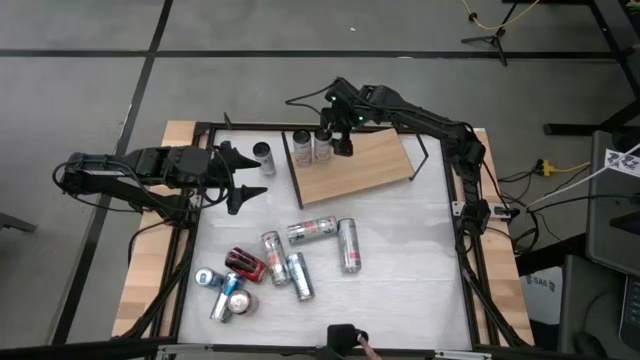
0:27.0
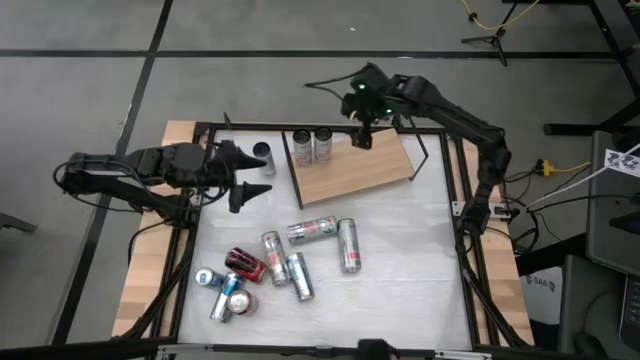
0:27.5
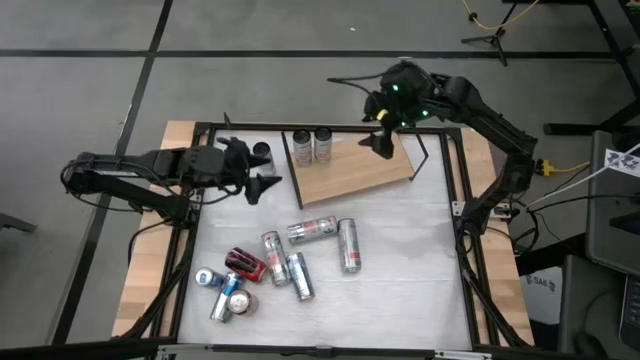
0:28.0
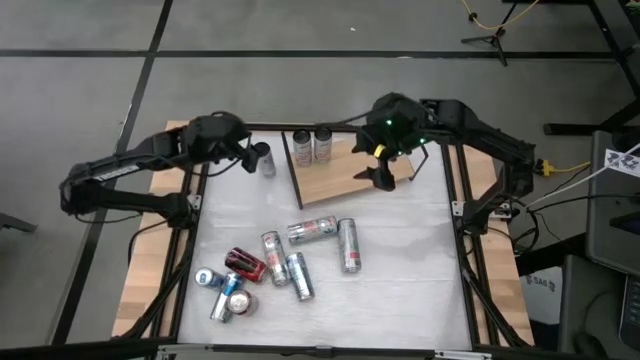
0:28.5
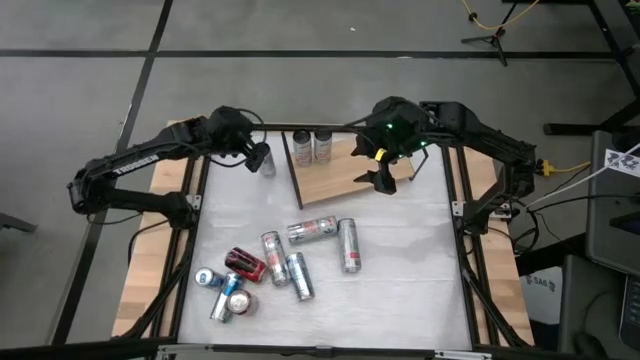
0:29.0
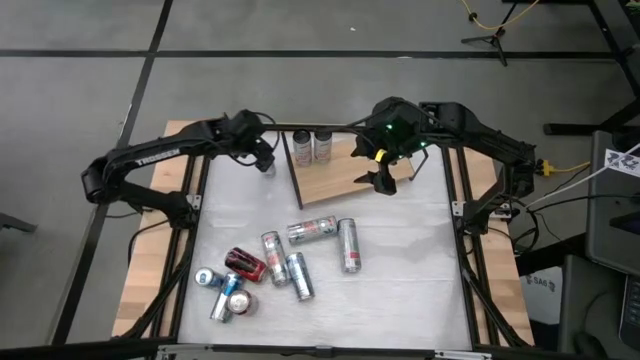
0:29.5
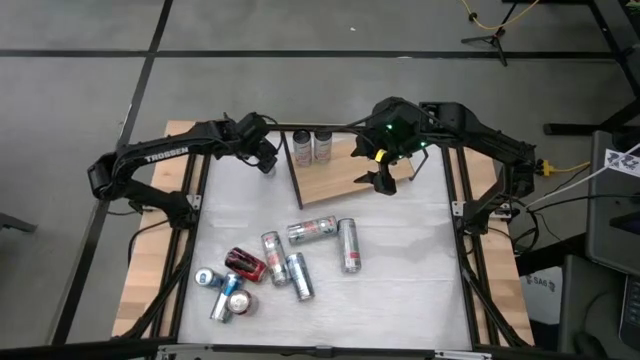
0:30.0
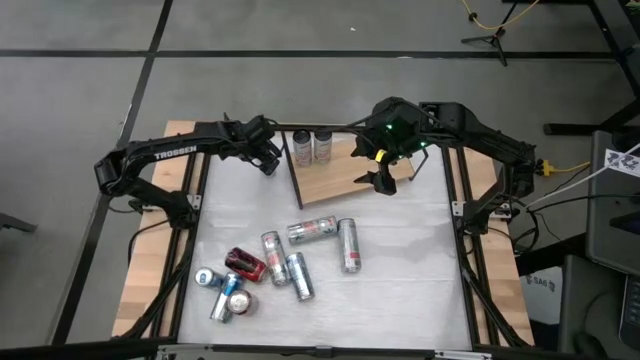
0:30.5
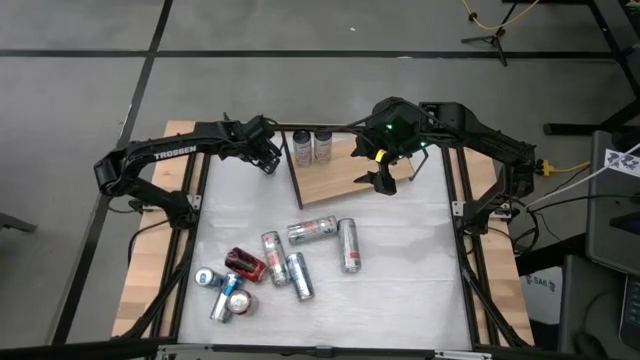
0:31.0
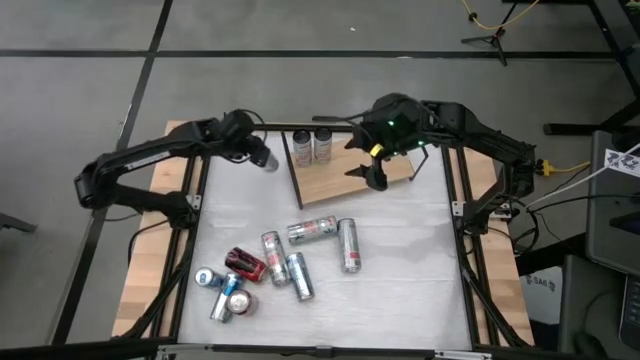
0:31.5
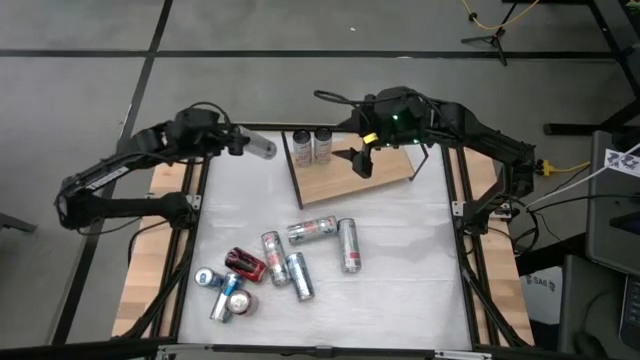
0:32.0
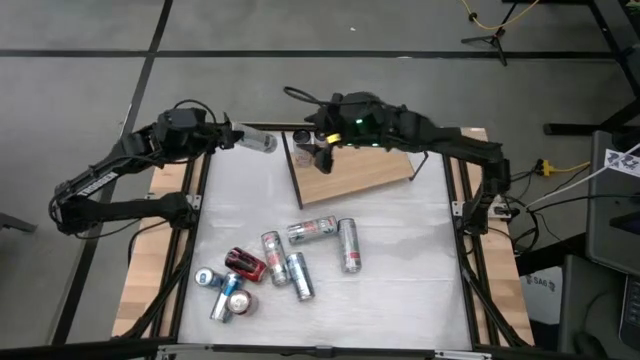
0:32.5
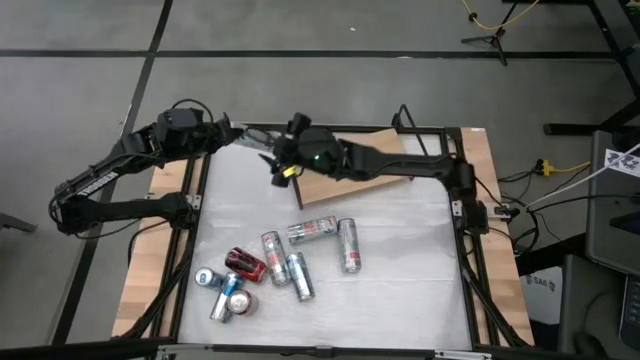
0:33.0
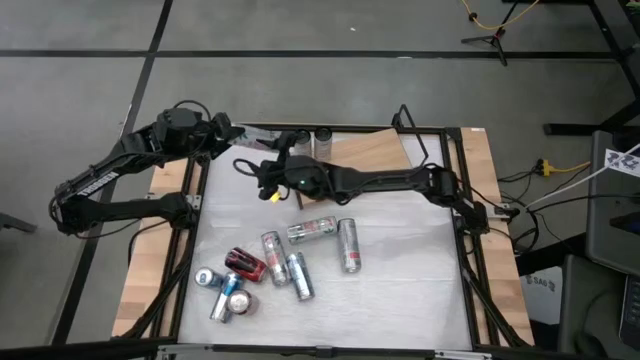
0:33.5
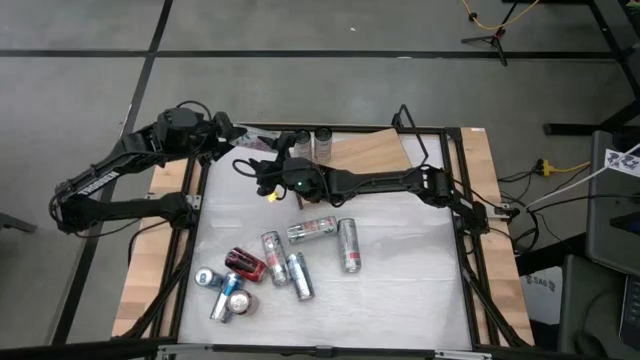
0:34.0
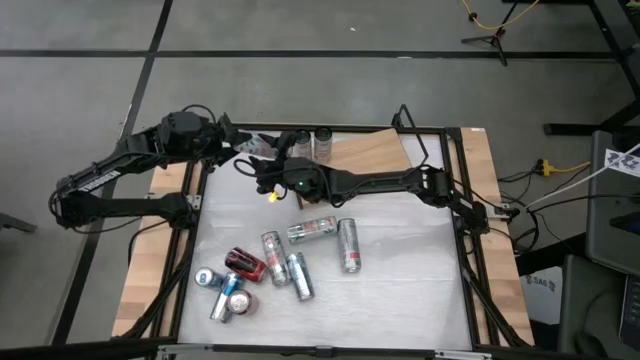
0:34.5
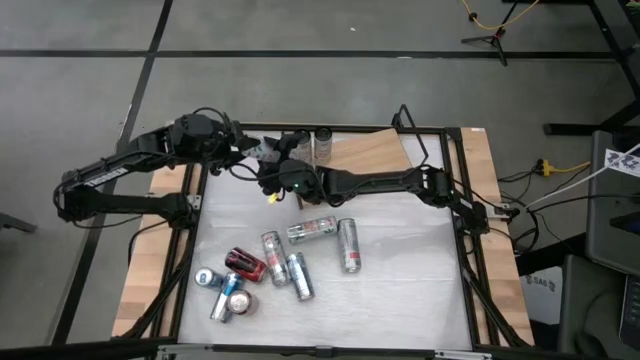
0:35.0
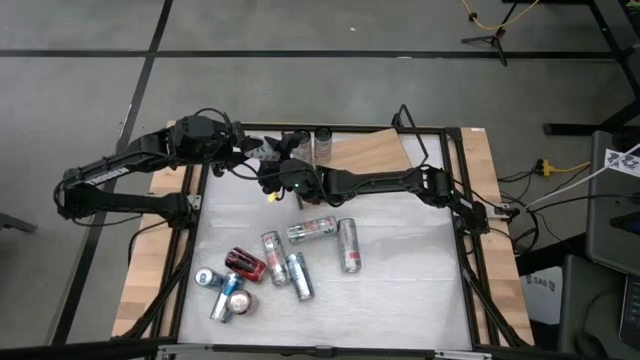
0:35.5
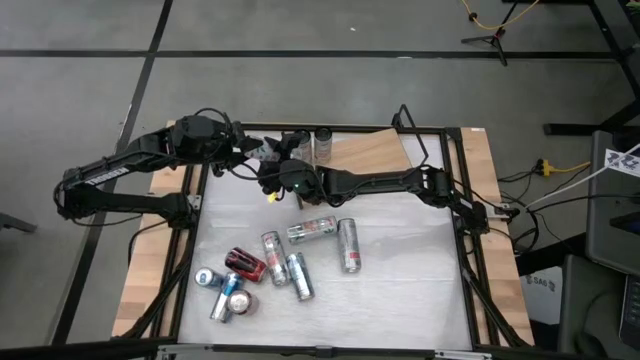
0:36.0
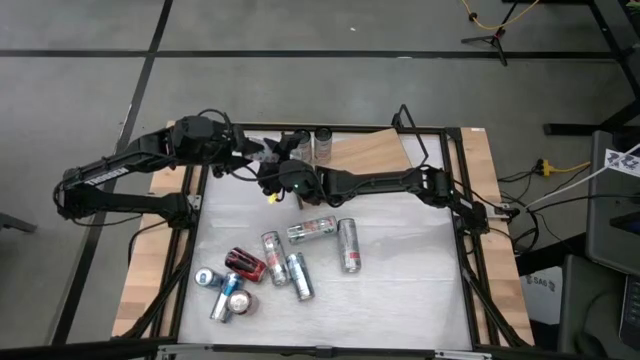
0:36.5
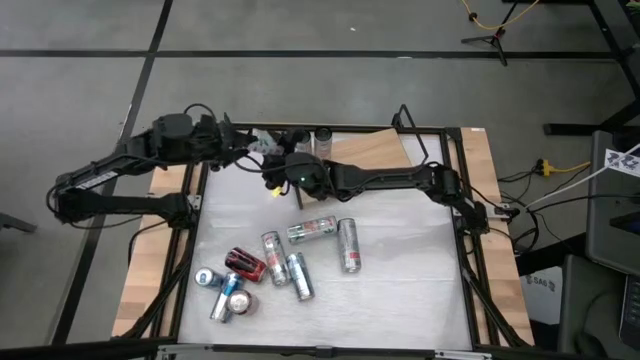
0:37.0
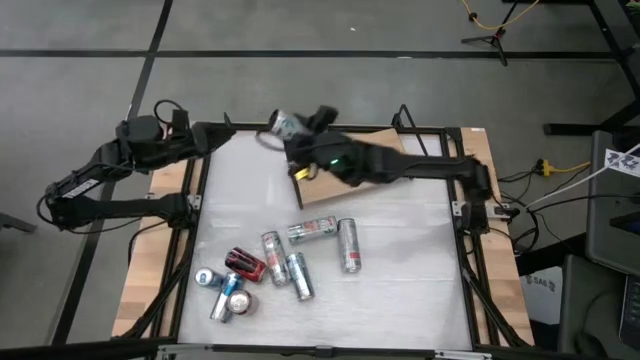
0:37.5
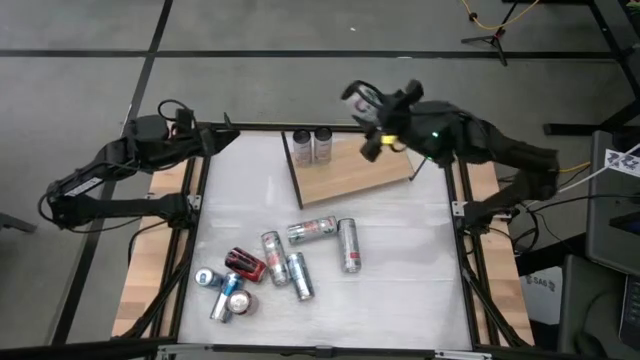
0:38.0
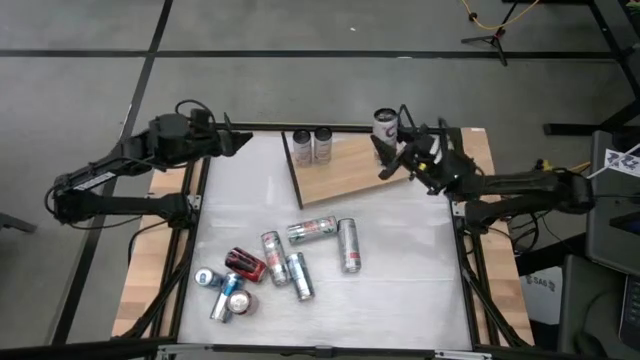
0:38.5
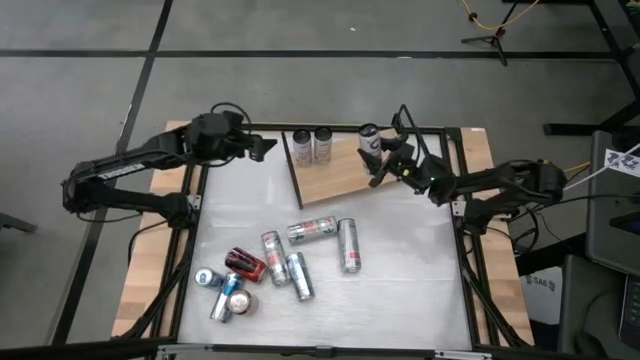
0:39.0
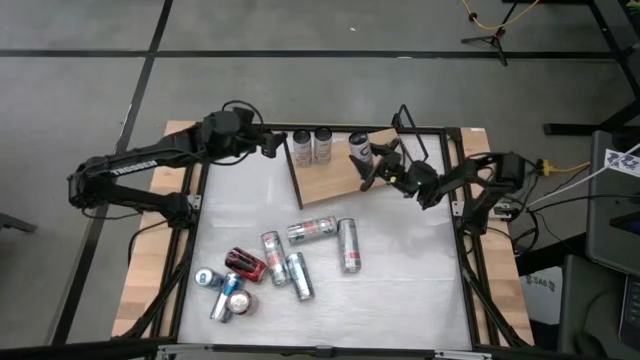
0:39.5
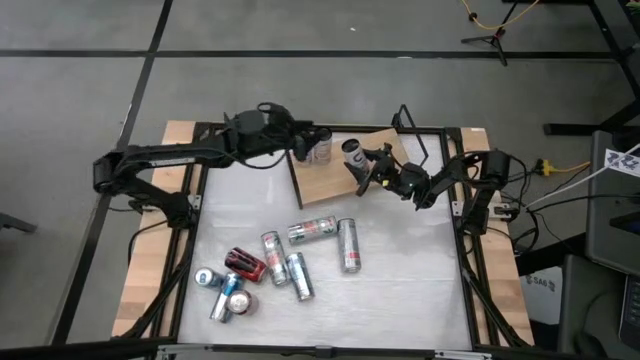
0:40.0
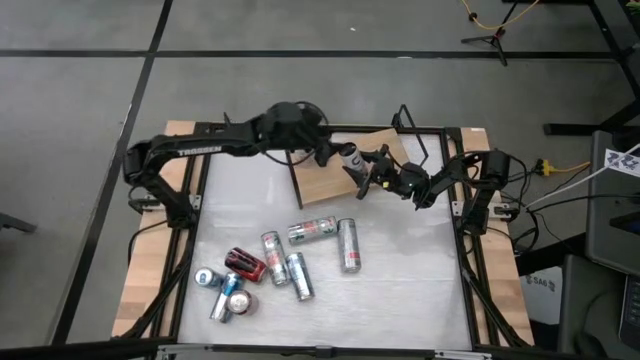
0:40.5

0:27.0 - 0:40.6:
Task: Place canned beverage on shelf
Put the white pink soda can on the shelf aligned with the other white pink soda cans

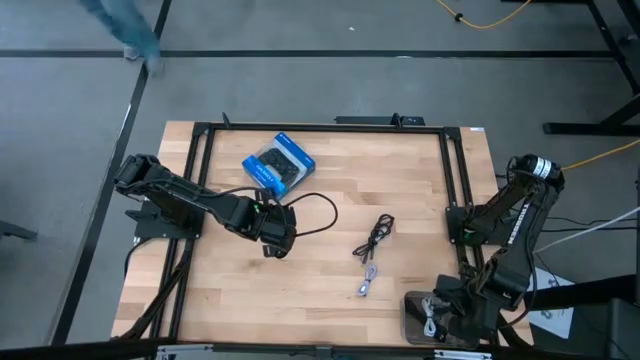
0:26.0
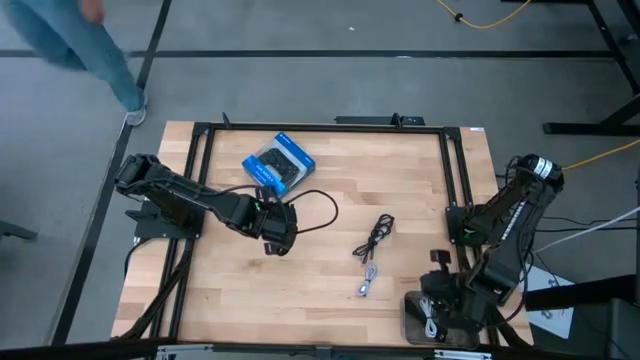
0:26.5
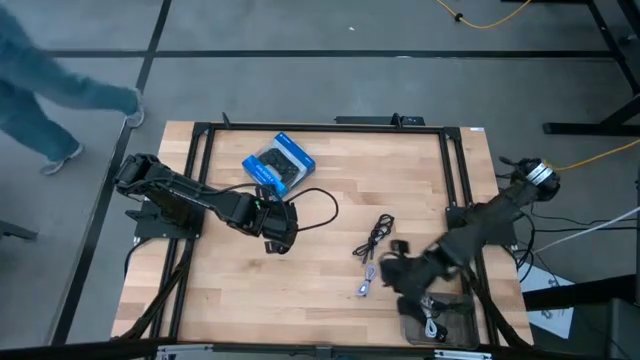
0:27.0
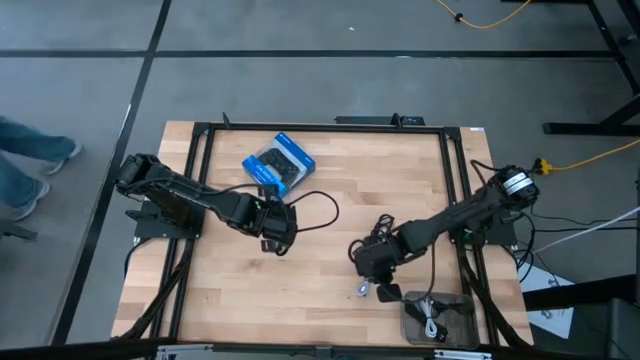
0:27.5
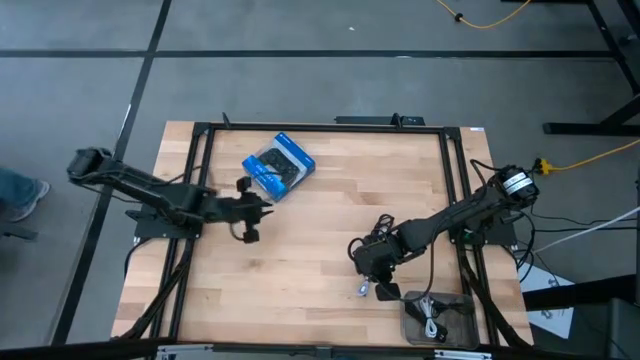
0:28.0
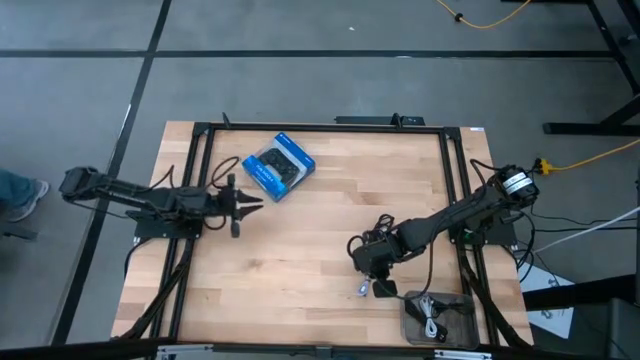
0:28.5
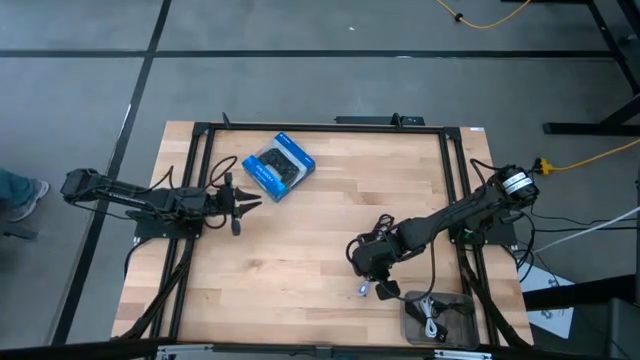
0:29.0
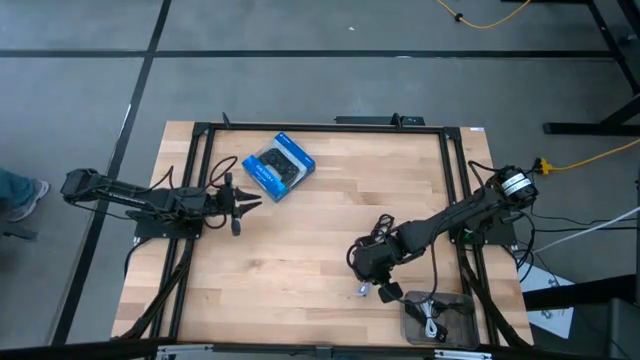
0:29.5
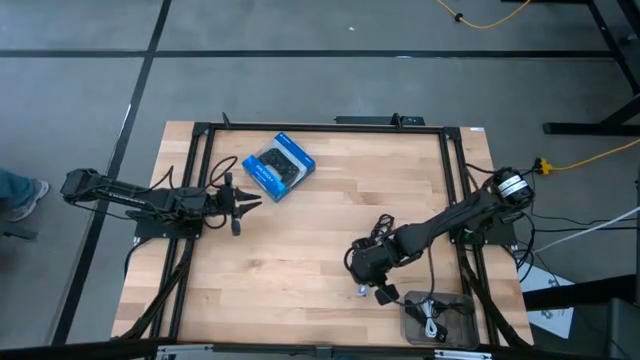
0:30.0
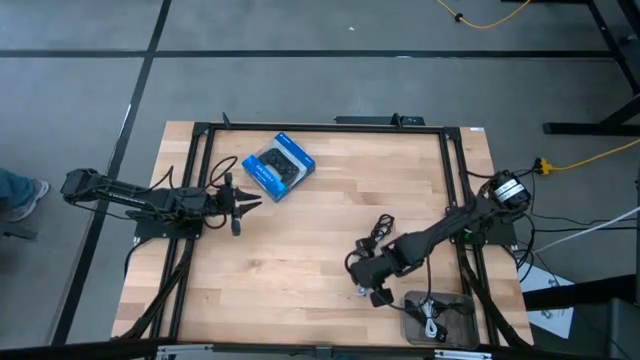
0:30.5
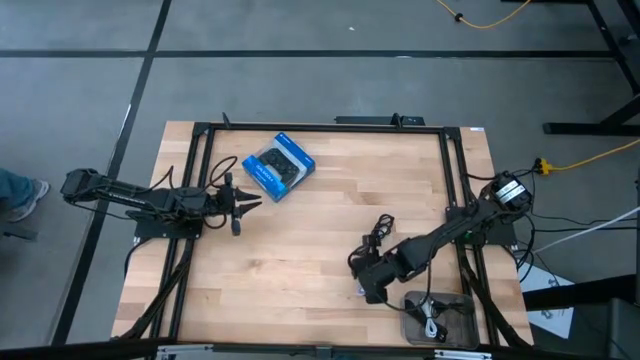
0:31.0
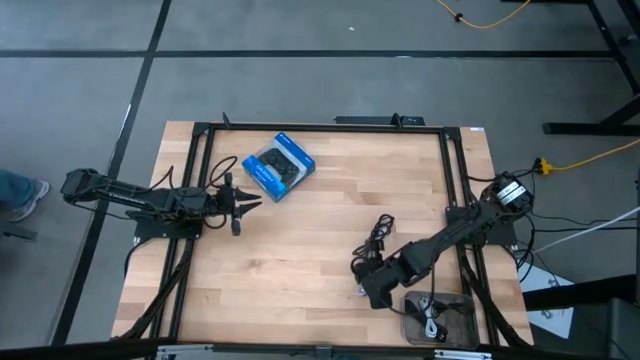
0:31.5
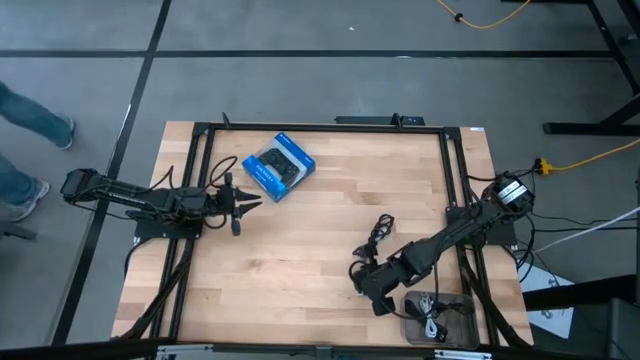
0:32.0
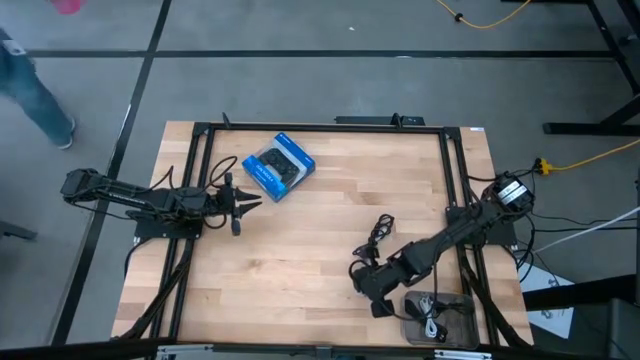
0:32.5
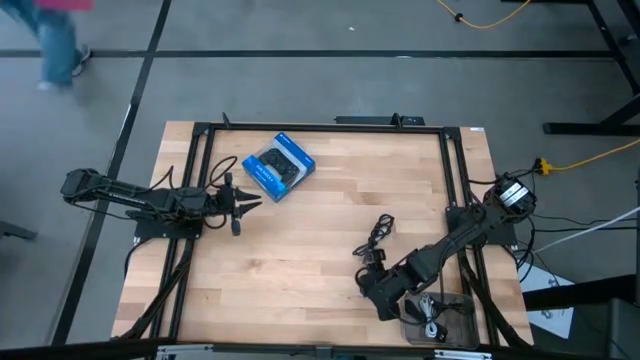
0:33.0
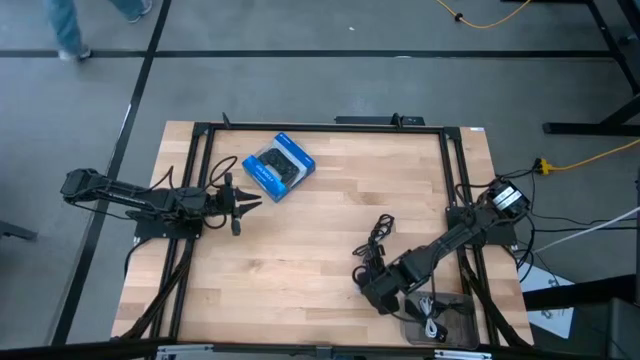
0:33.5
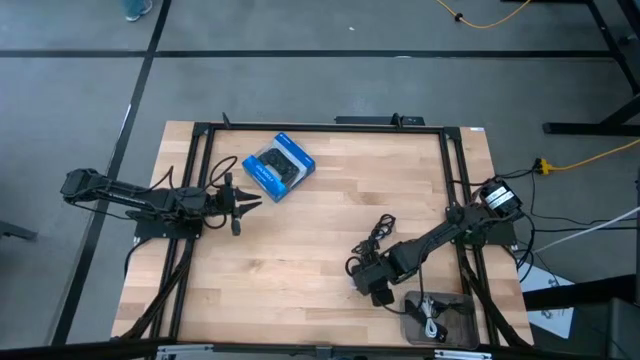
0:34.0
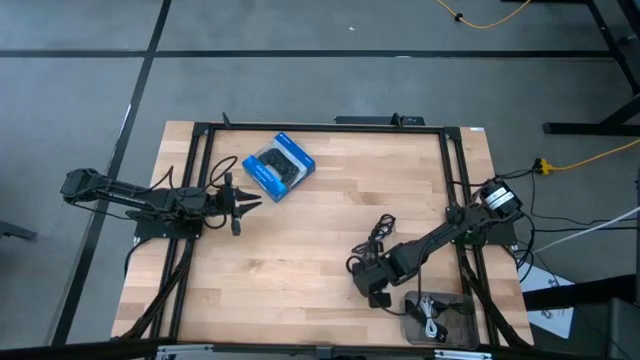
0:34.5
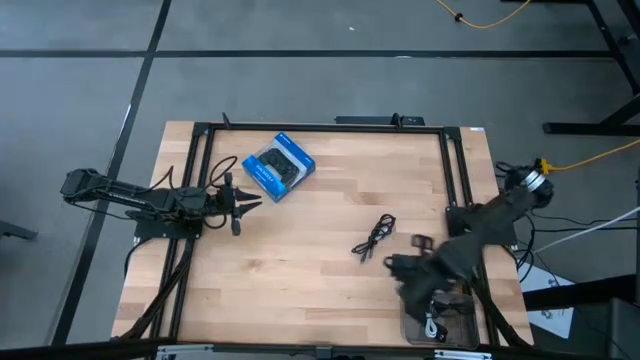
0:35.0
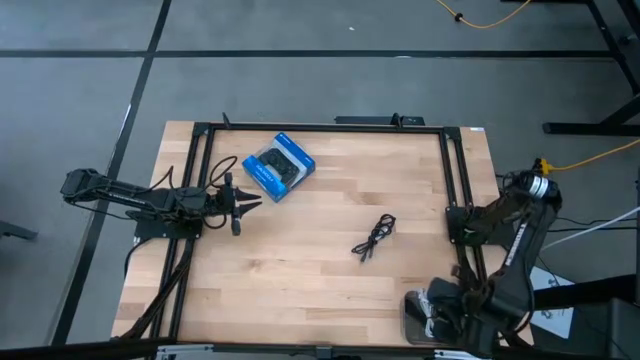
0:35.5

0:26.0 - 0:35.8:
Task: Pick and place USB-C Cables
Put the white charger cable into the black bin
